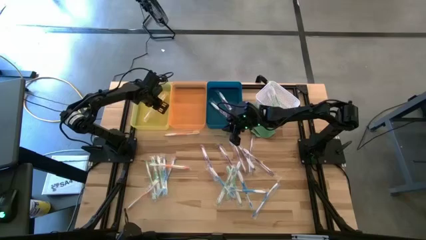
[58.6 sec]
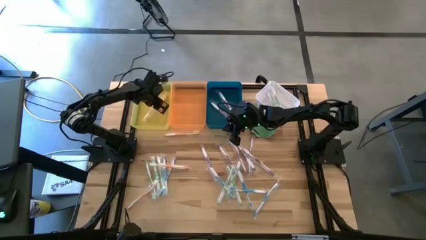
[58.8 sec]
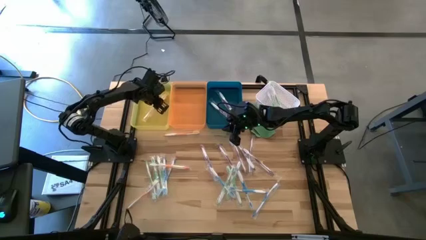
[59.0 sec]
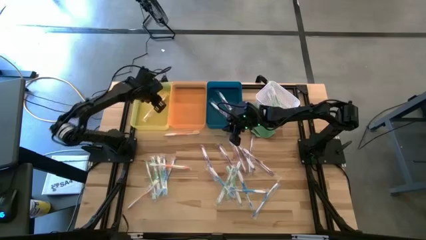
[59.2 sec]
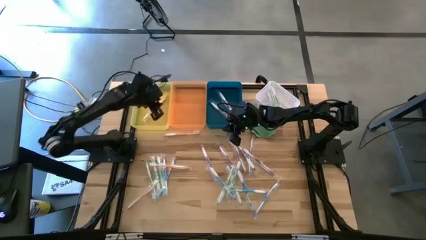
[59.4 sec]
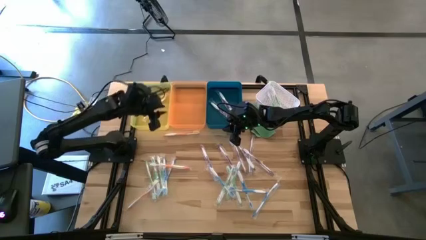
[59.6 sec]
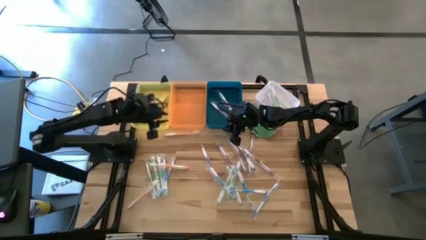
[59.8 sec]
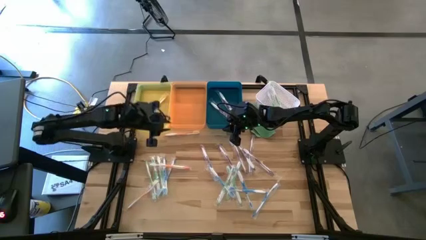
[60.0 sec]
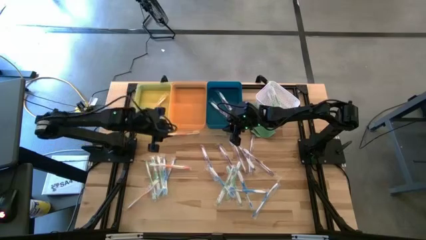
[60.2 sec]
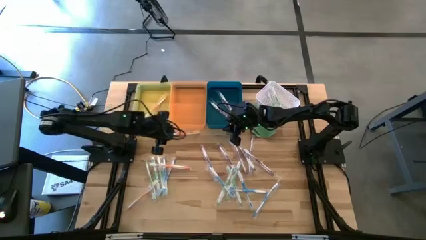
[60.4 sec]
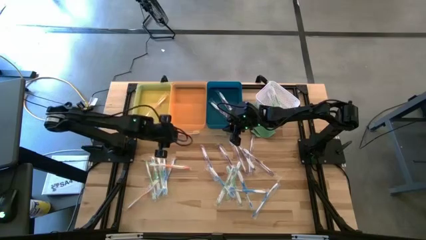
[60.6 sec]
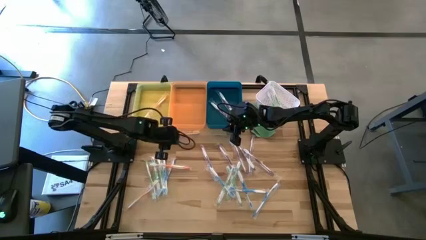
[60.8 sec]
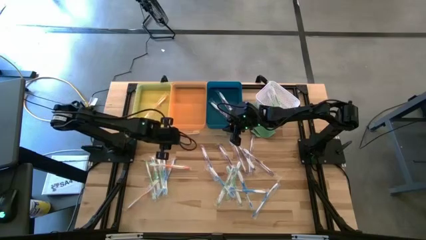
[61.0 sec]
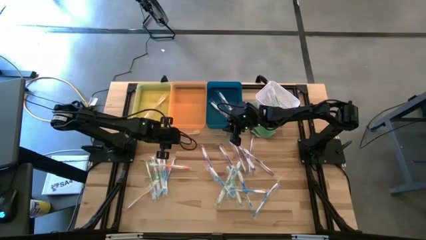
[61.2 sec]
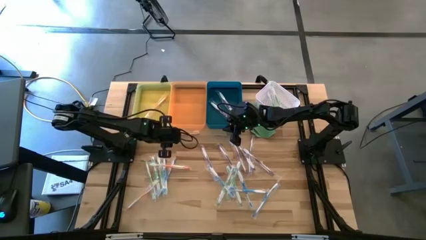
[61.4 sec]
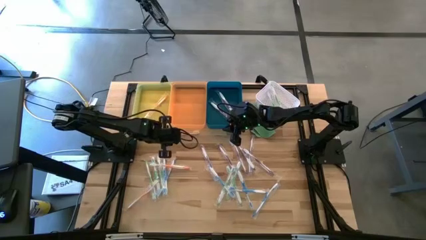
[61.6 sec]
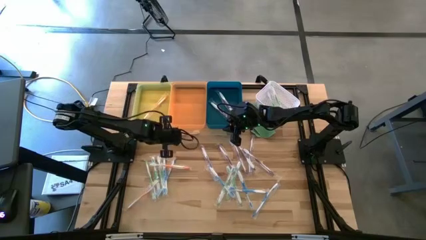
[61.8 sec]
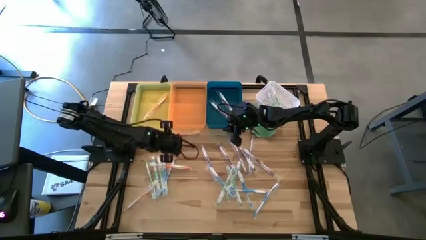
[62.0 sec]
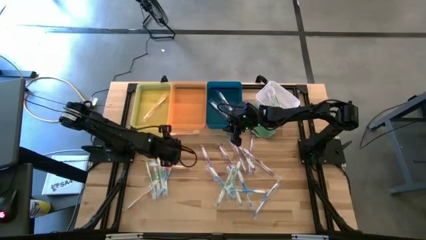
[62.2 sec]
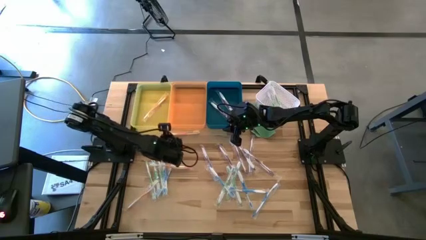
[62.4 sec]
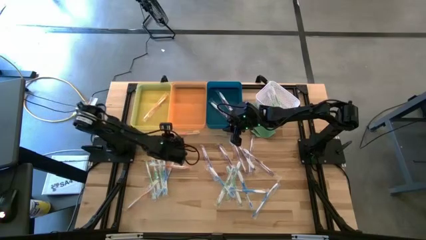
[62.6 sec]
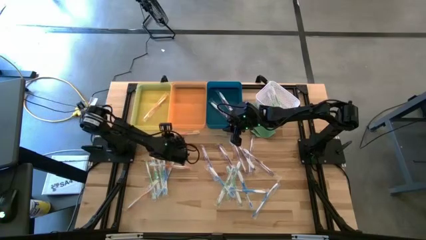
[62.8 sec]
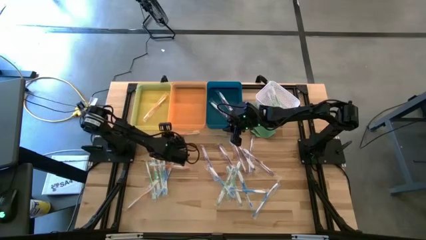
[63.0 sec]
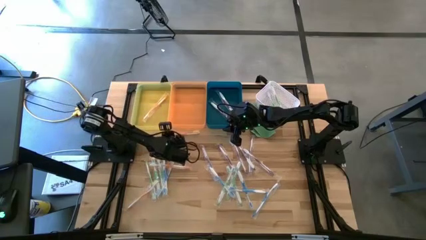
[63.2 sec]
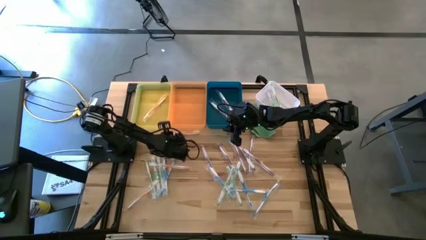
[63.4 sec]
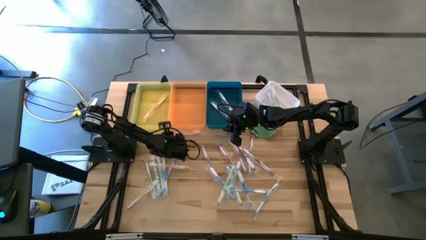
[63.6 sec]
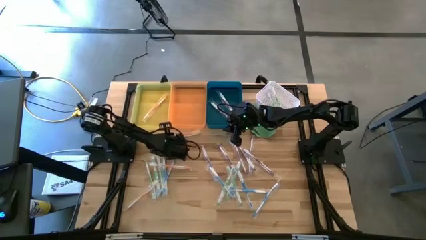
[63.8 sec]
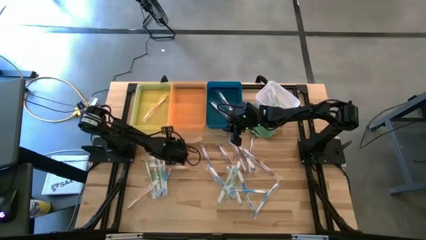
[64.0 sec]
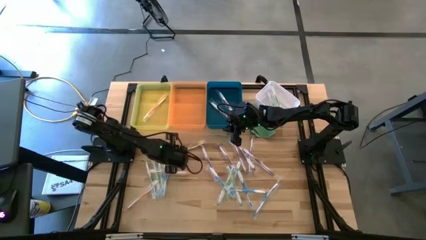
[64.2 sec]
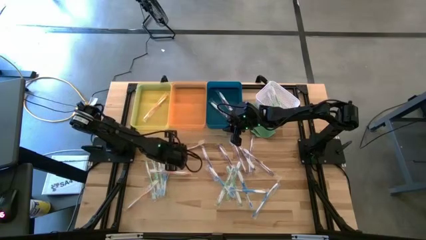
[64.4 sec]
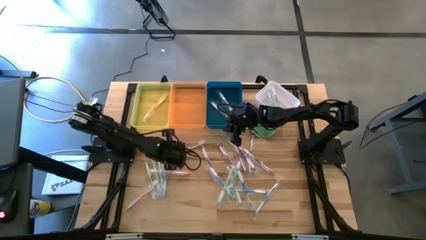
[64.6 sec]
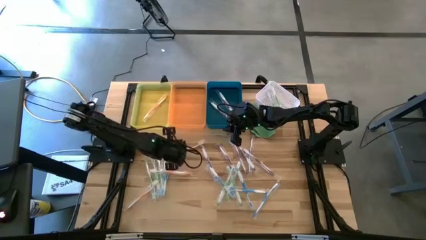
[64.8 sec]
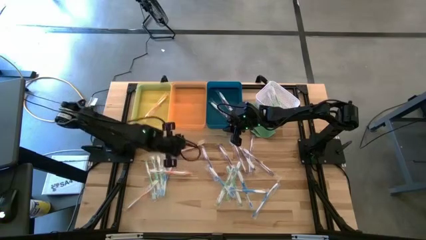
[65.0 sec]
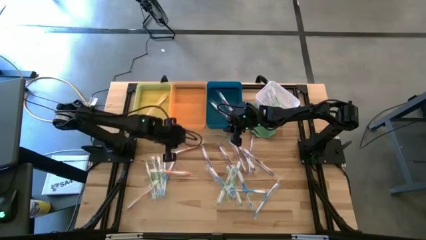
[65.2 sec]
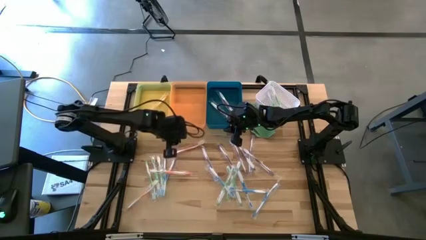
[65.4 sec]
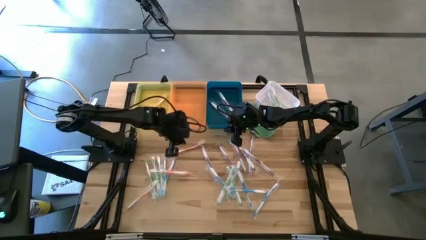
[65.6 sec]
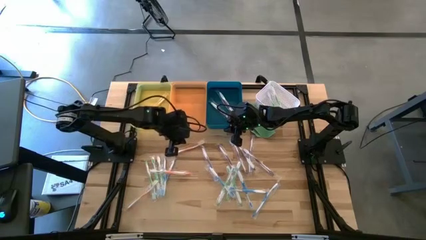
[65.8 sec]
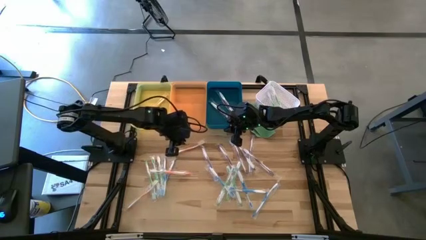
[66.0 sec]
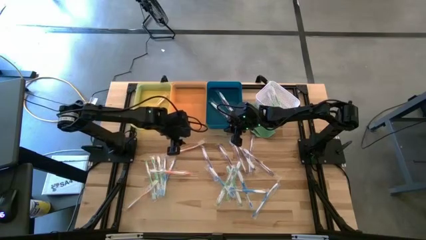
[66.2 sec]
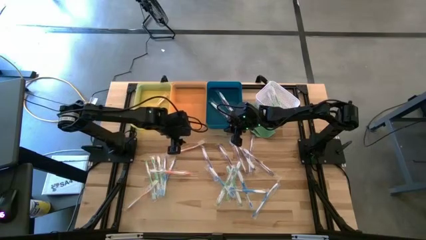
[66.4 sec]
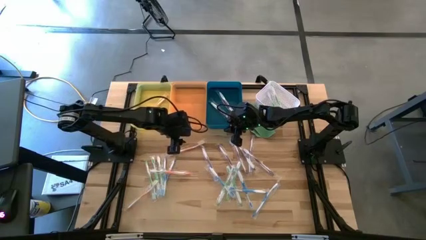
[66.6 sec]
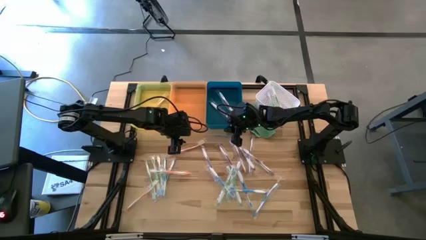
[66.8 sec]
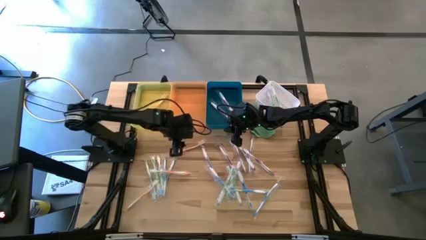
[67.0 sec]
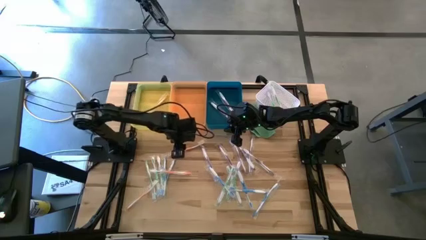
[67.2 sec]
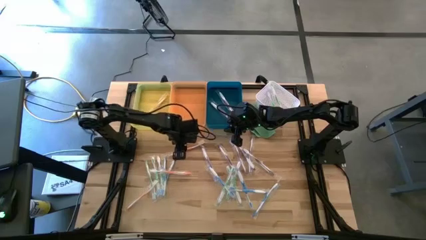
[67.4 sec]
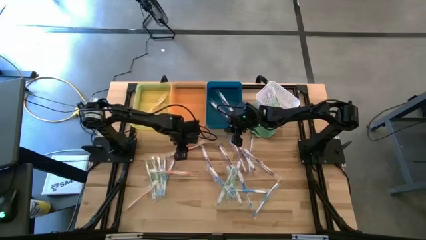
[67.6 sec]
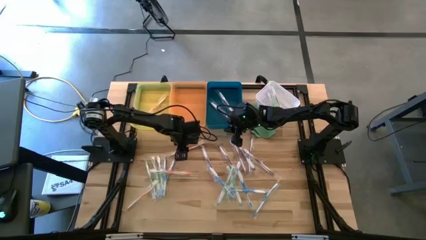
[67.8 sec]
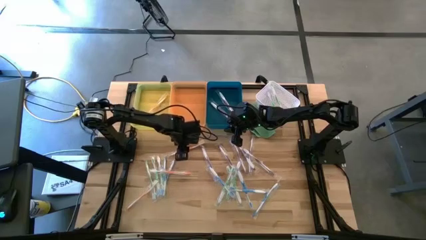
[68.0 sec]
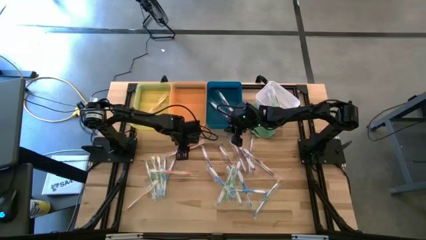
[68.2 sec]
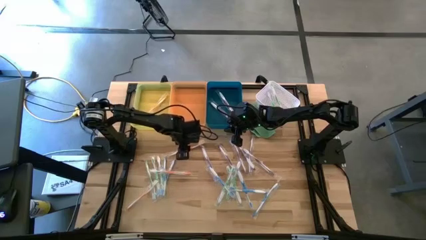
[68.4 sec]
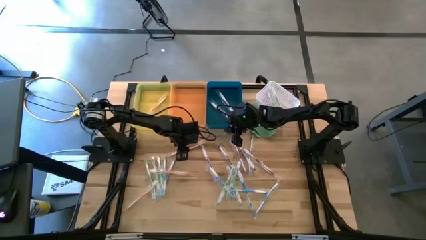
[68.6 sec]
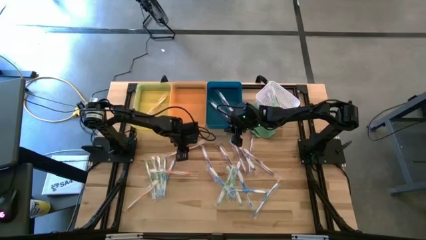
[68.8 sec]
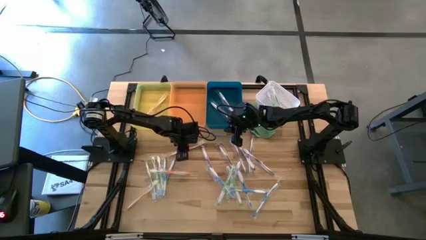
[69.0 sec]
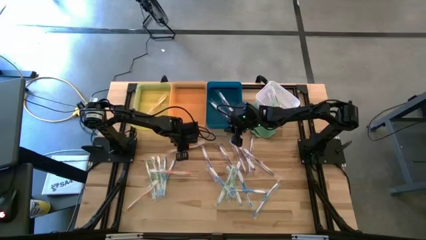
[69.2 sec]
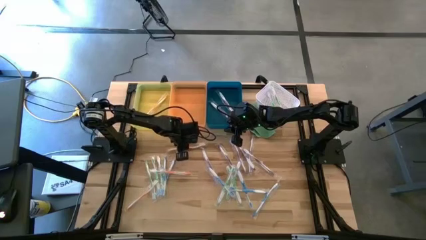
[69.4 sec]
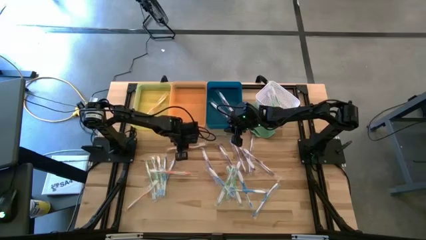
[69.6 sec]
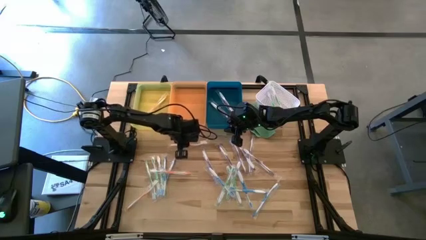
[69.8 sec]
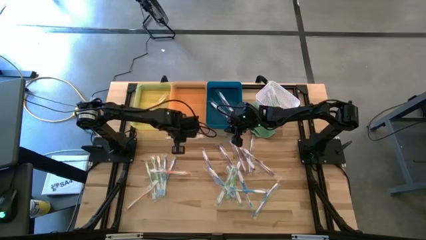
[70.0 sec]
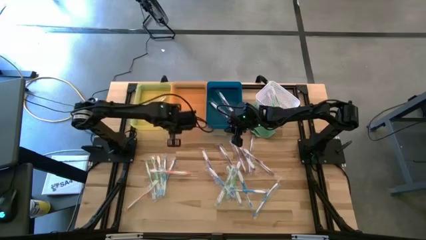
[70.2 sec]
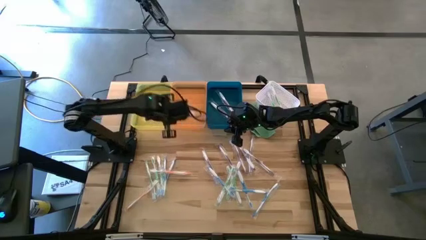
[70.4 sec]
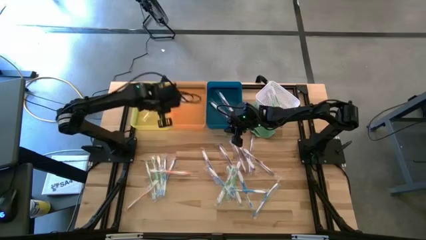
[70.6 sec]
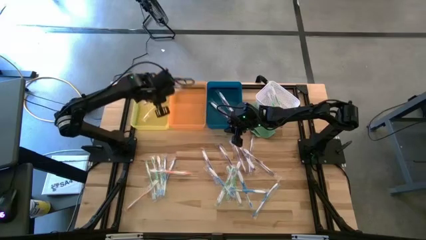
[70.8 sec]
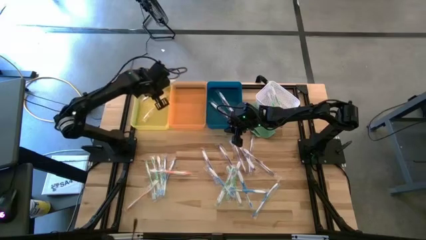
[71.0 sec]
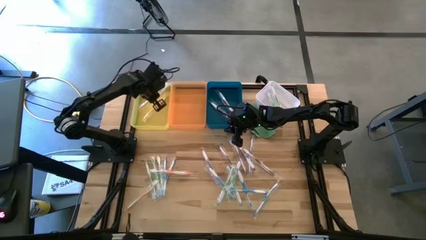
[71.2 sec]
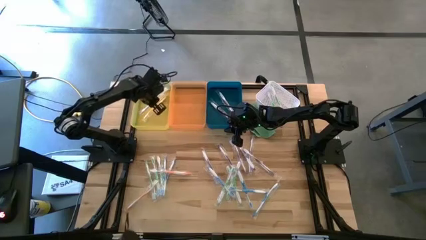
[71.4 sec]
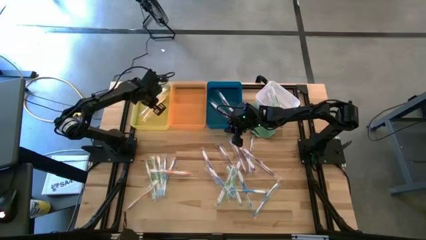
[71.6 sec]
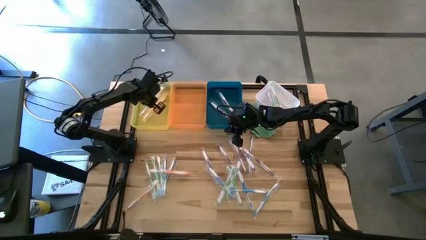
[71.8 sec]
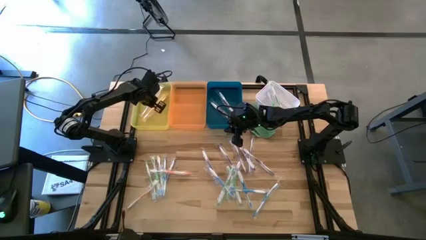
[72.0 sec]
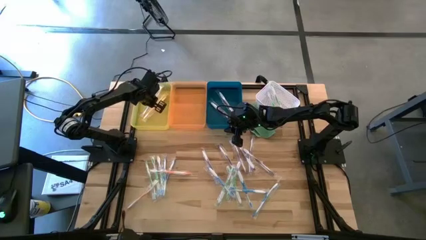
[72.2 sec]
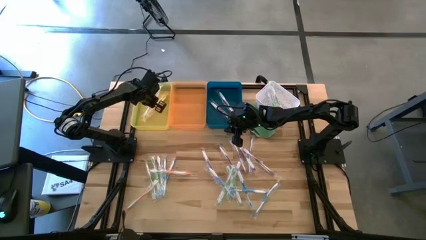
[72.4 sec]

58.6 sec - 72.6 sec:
Task: Pick & Place Toothbrushes
Put the yellow toothbrush into the yellow bin
